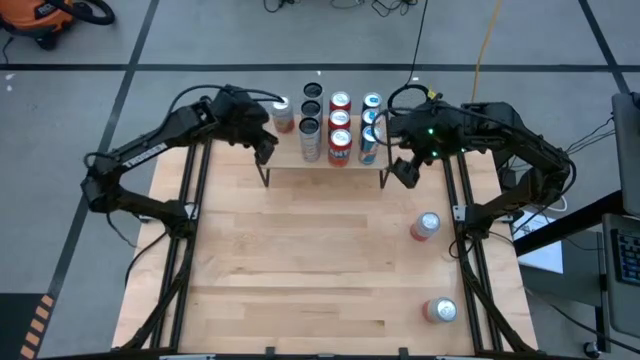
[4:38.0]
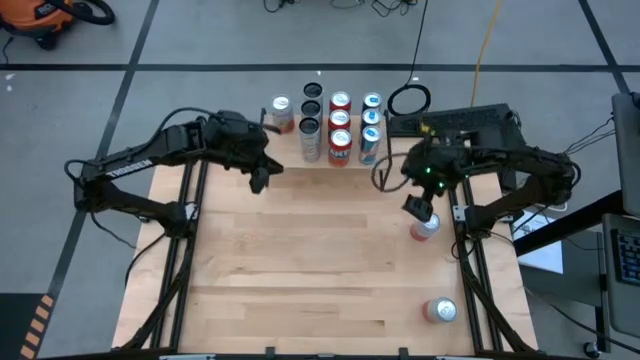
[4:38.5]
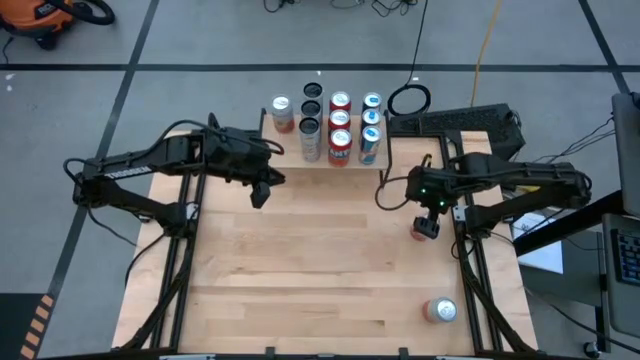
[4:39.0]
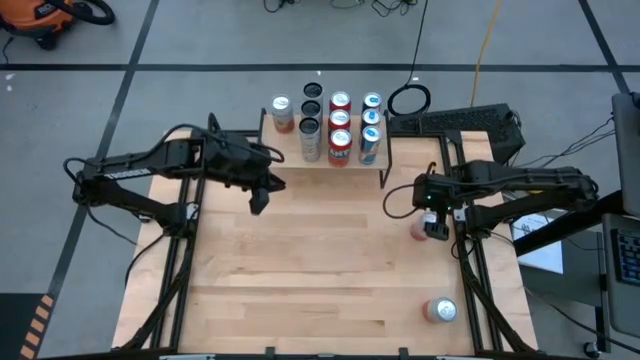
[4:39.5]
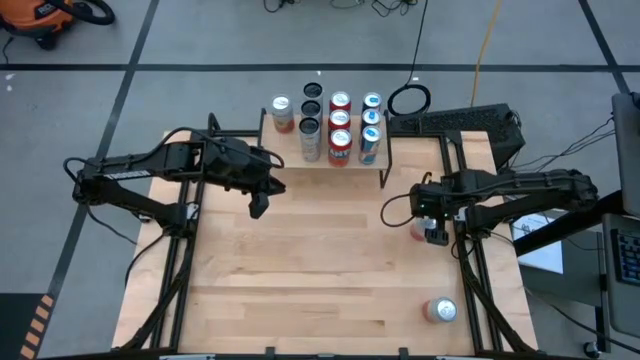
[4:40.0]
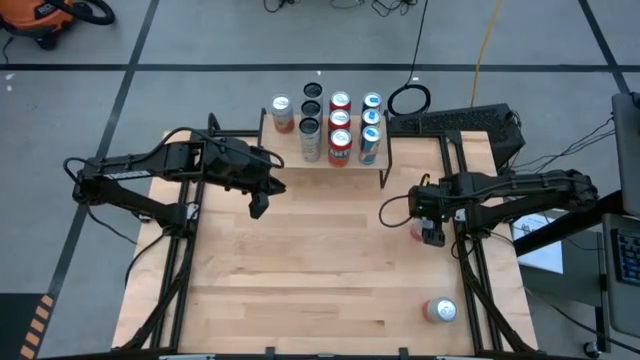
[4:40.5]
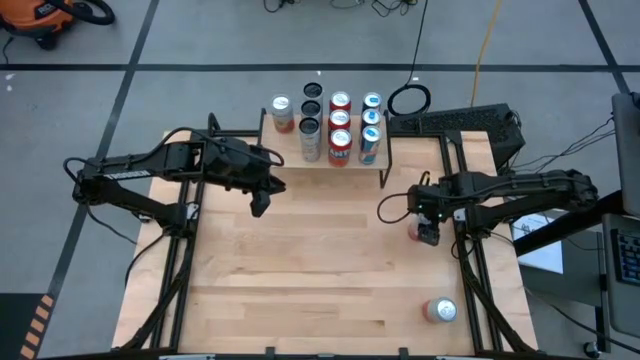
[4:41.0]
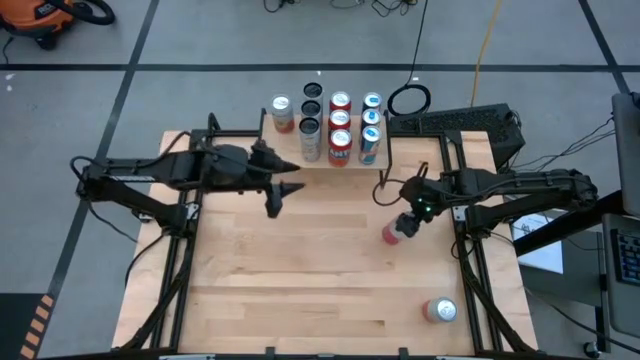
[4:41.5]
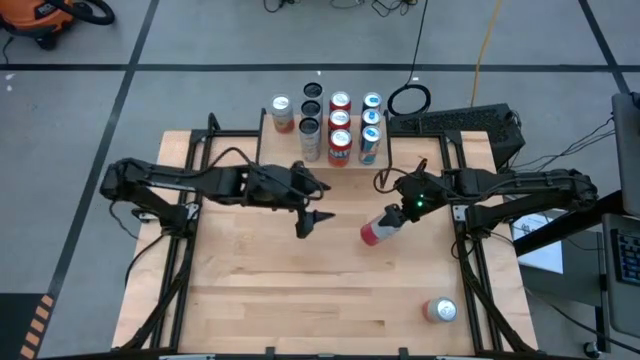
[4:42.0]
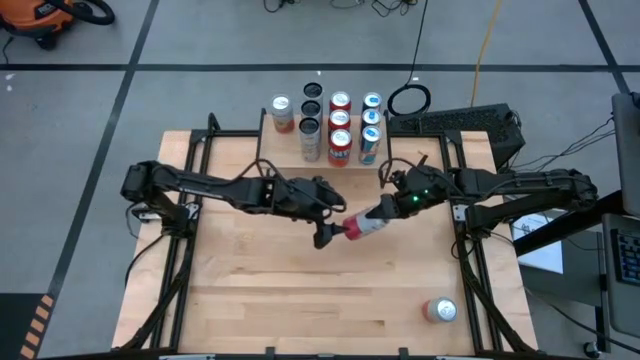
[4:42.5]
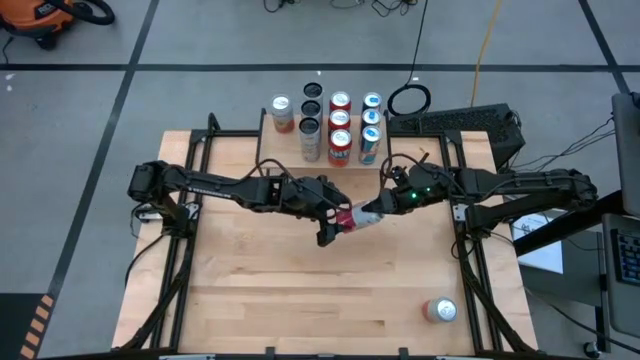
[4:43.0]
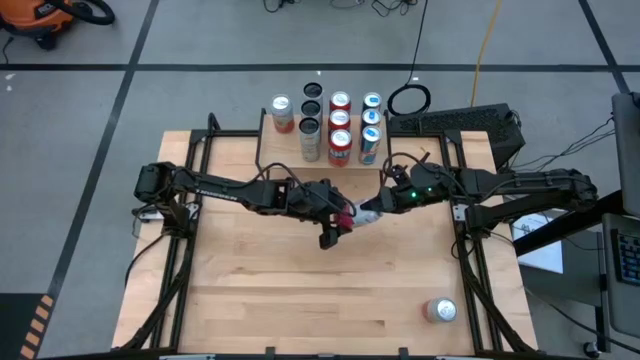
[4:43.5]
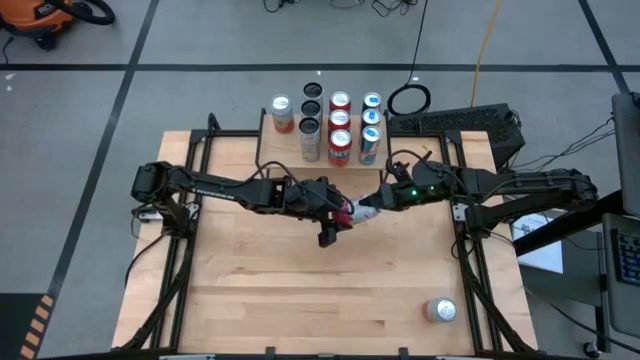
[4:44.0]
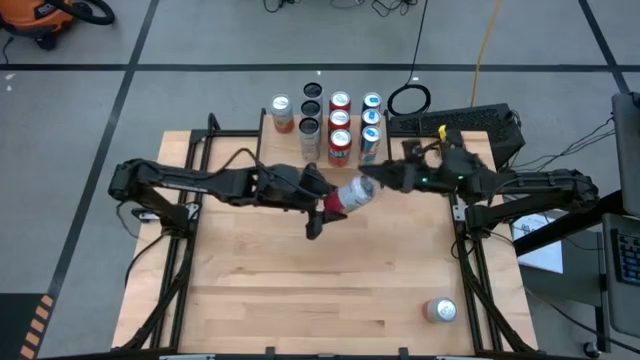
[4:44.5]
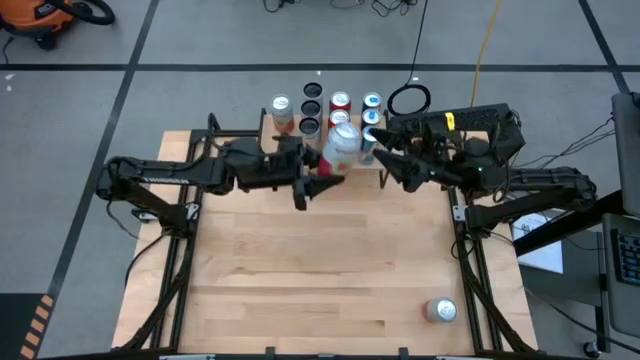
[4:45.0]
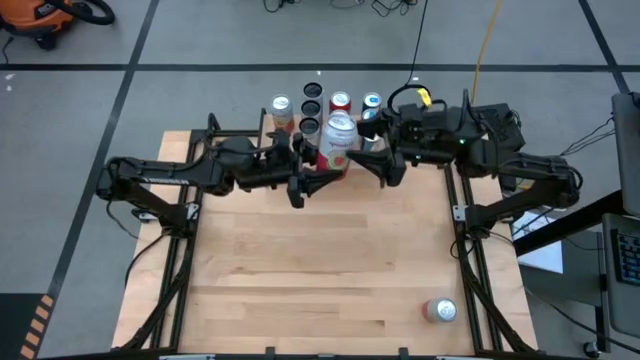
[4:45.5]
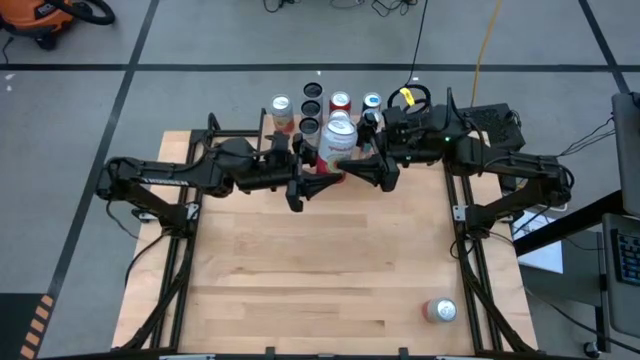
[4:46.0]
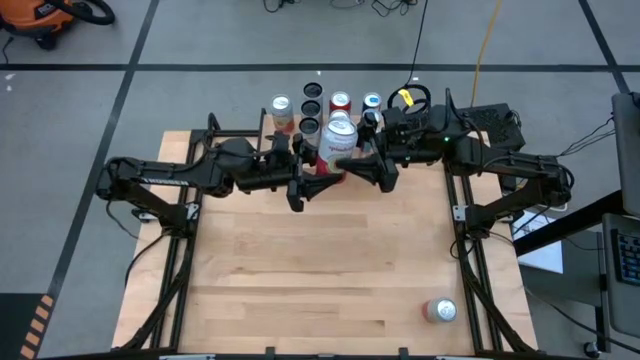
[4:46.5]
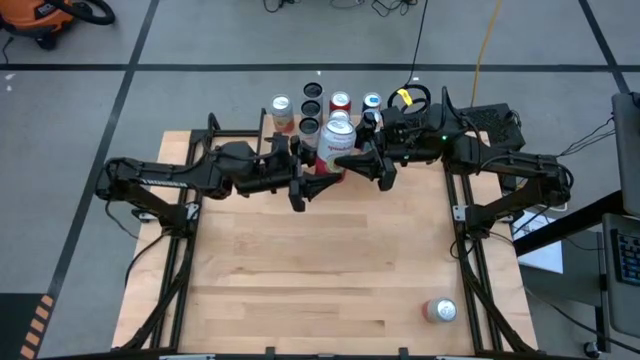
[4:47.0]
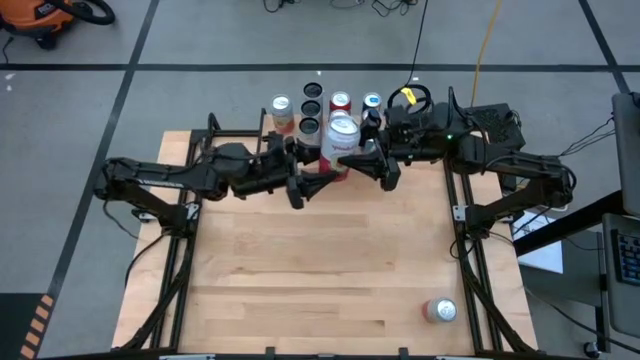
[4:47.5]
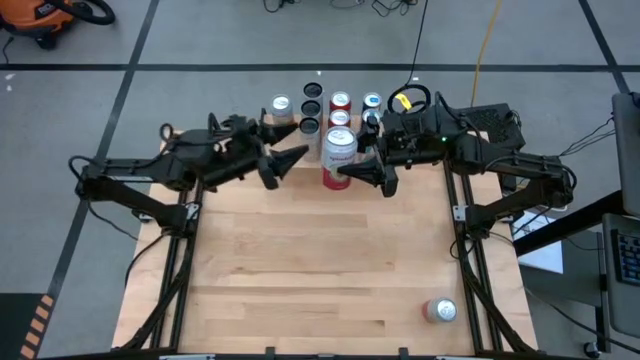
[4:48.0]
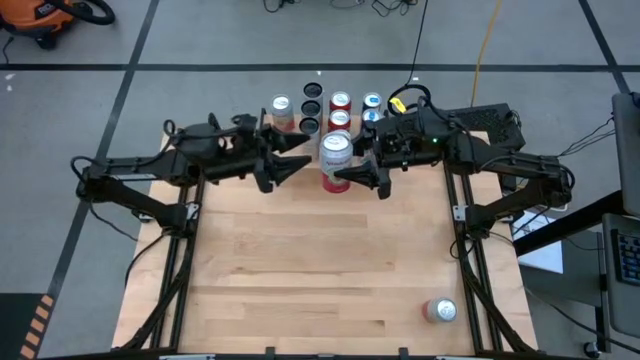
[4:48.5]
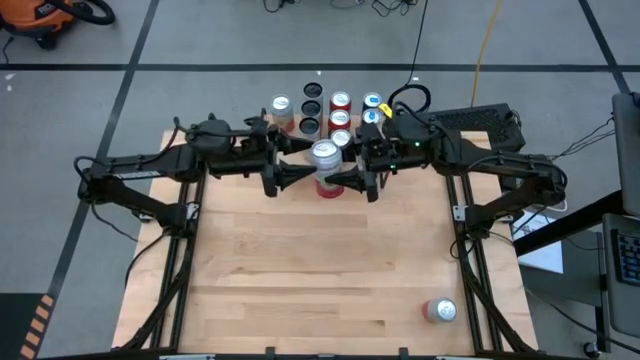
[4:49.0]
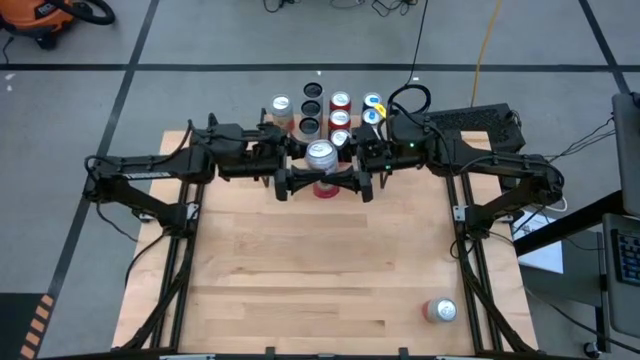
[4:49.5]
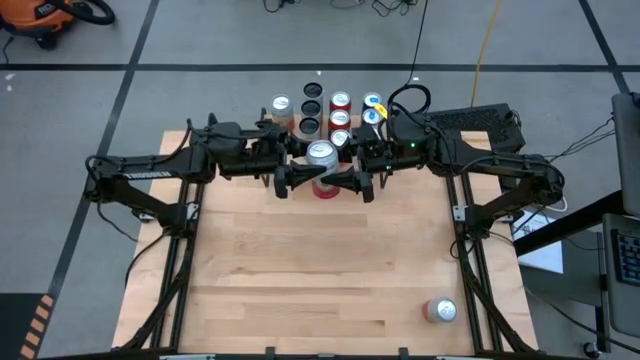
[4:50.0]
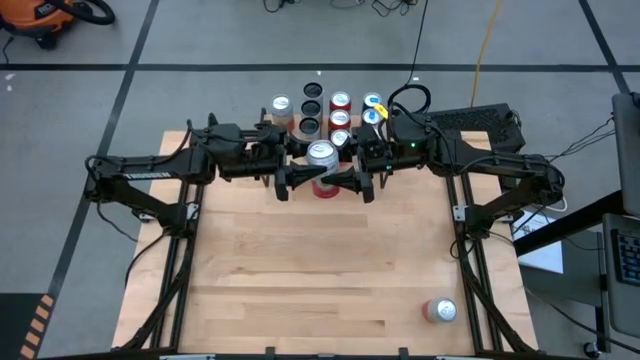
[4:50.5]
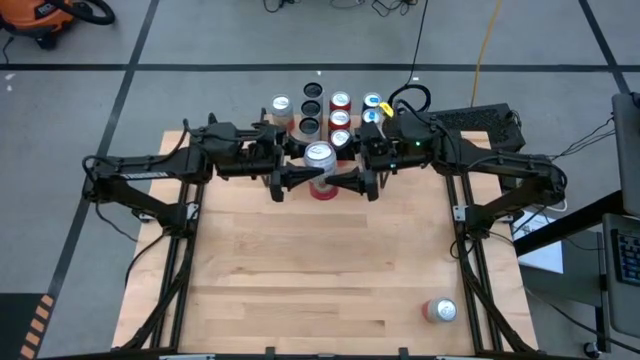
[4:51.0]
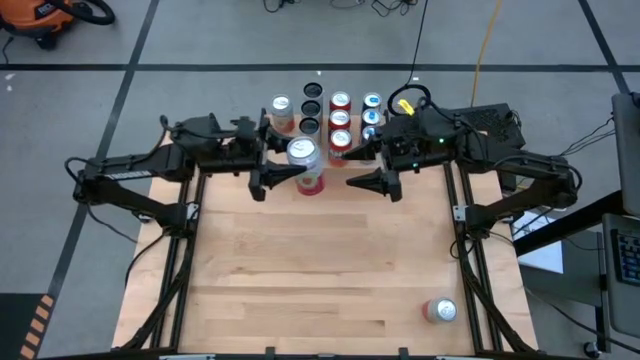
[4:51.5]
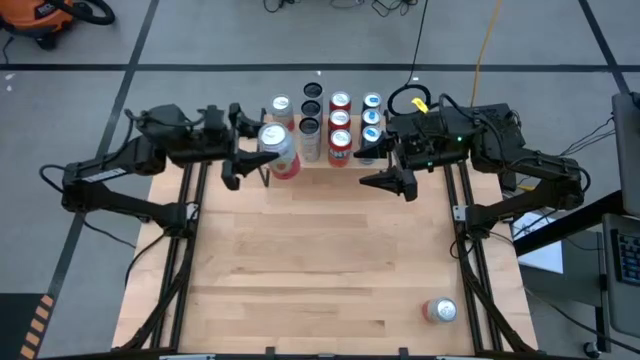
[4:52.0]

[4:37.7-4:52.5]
Task: Place canned beverage on shelf
Put the top pink and white soda can aligned with the other pink and white soda can on the shelf
